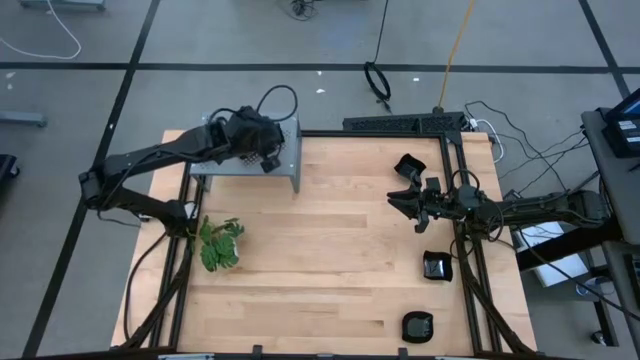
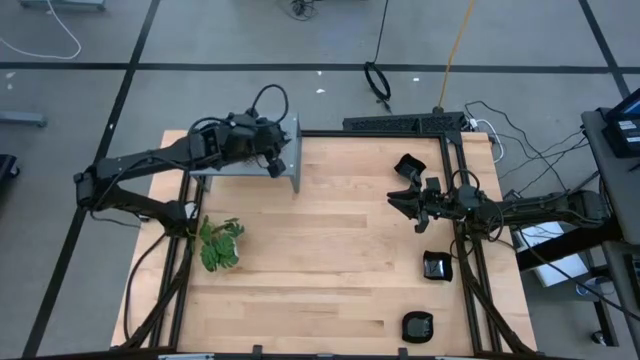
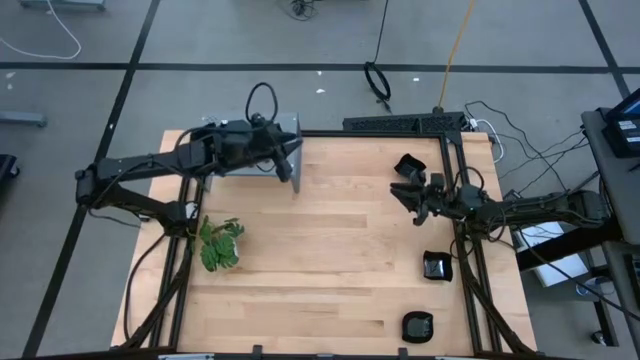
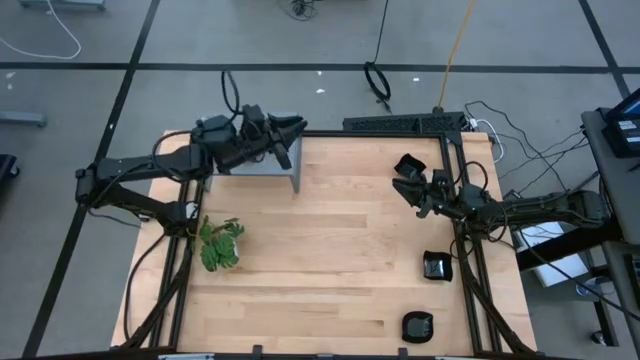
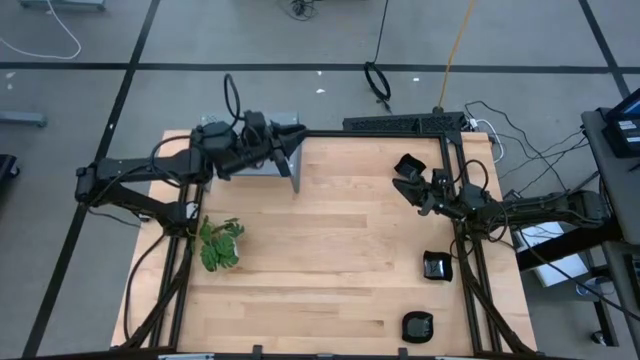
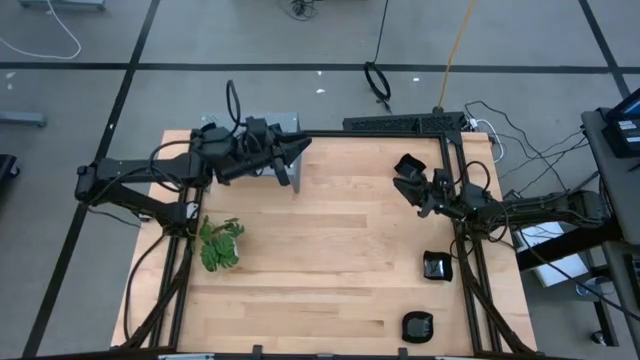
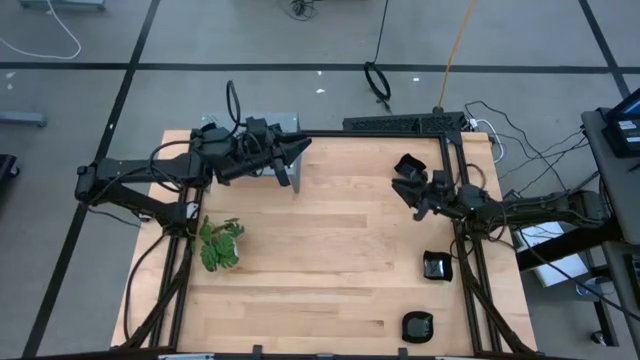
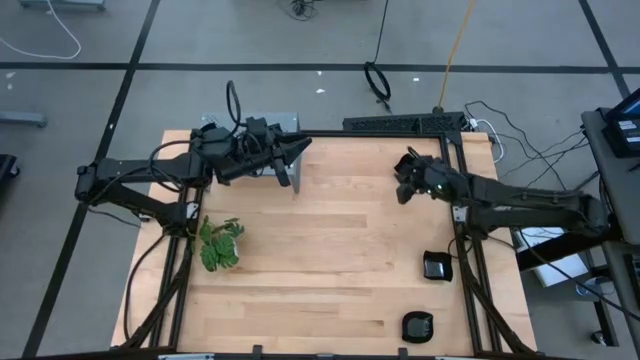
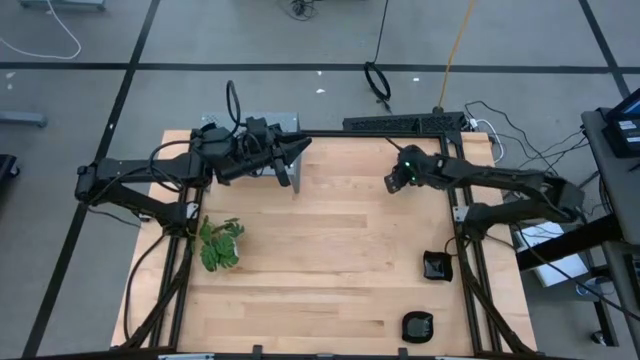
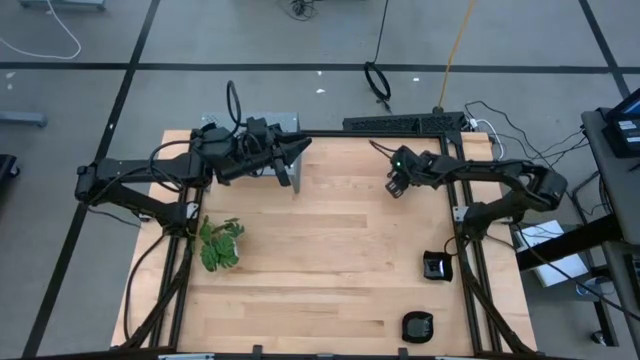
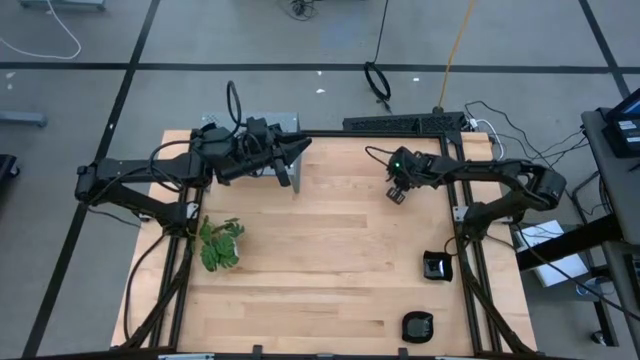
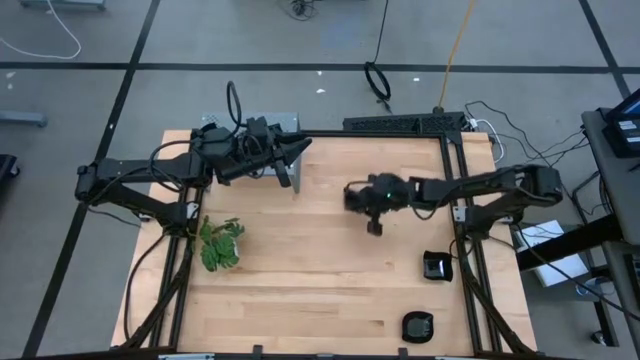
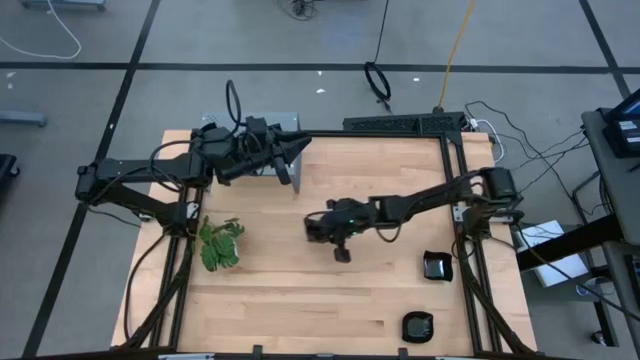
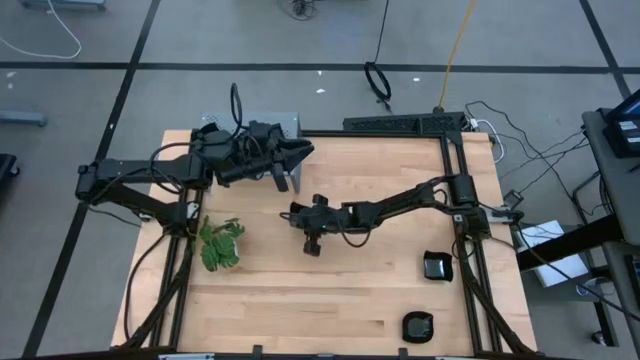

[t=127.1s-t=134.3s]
Task: Pick & Place Mini shaped plates
Move the distorted square plate to the center of the table

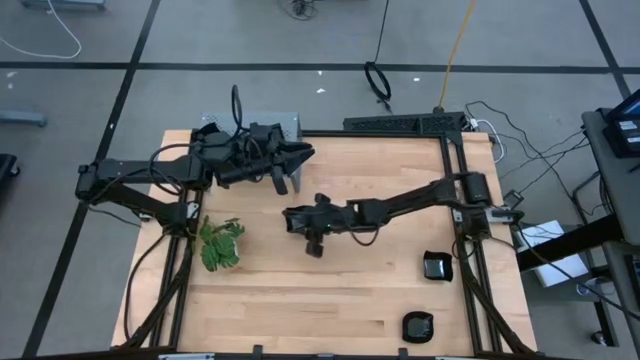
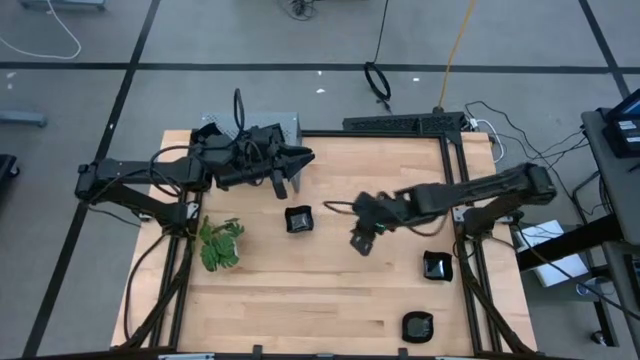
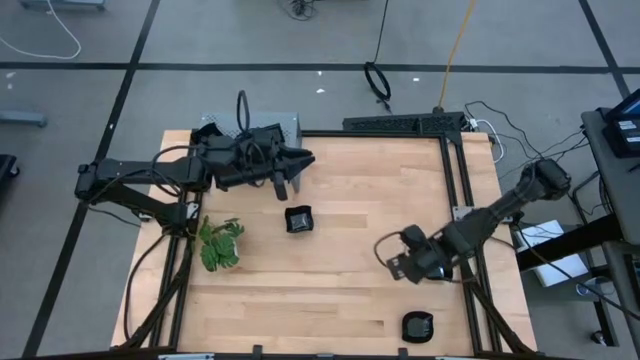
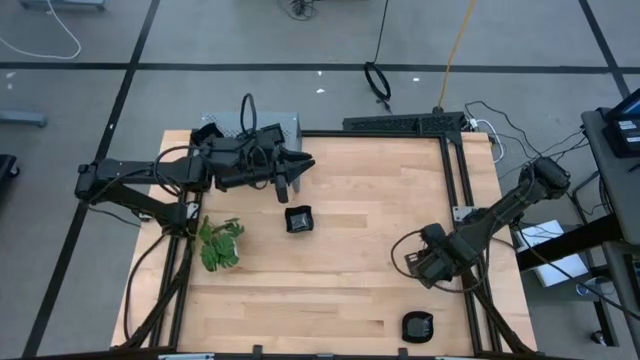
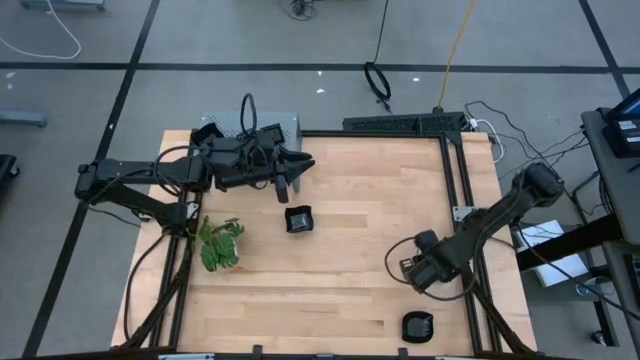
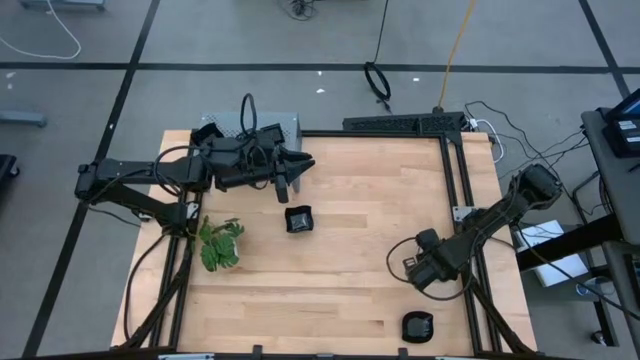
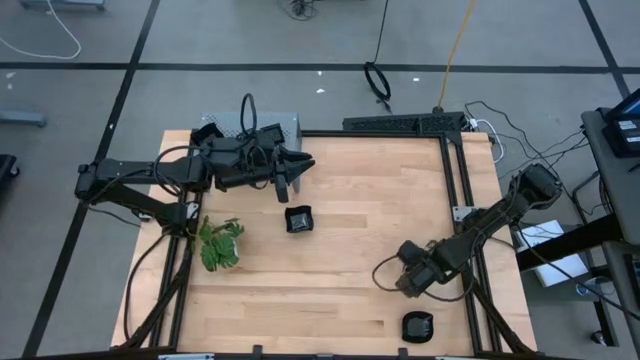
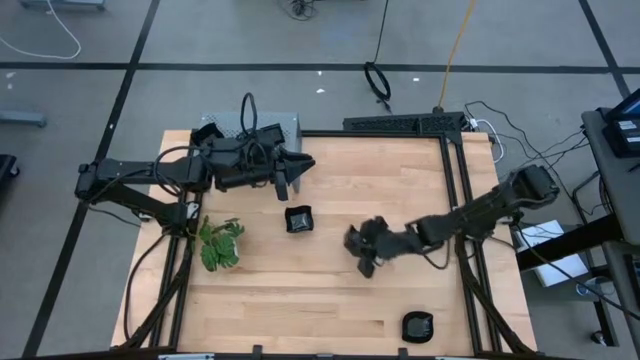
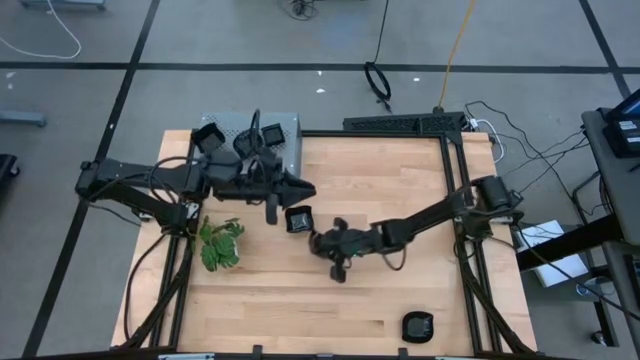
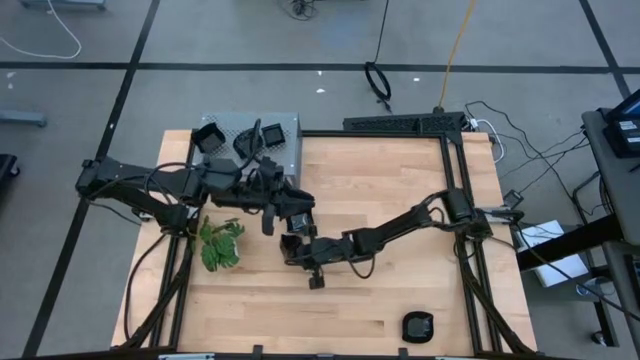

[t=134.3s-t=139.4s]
Move the distorted square plate to the center of the table

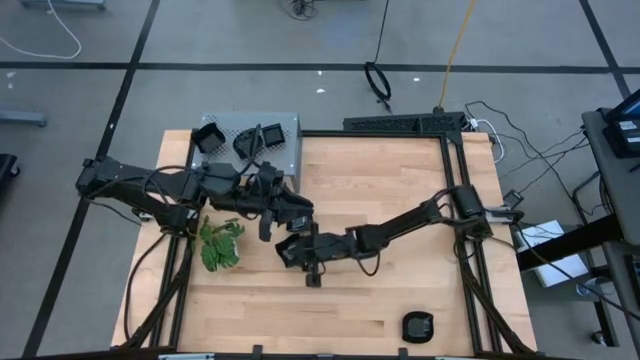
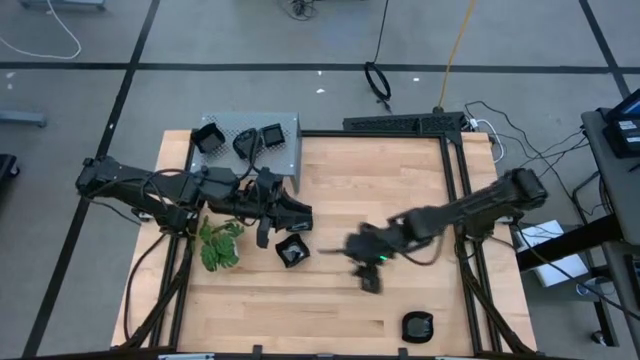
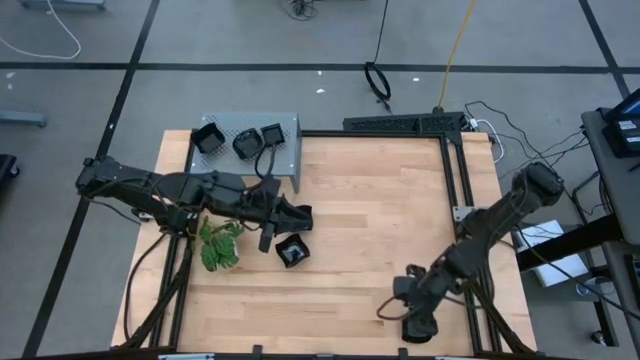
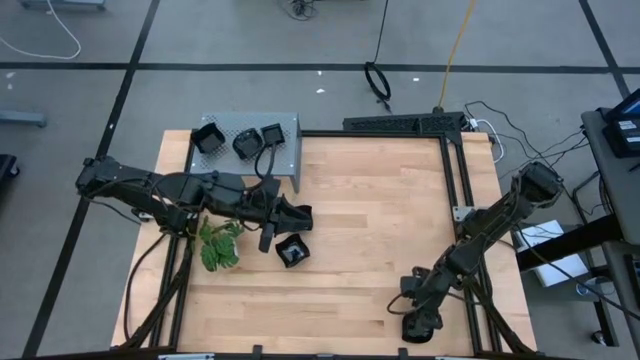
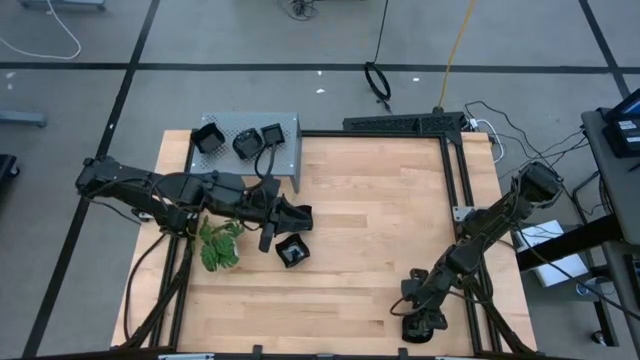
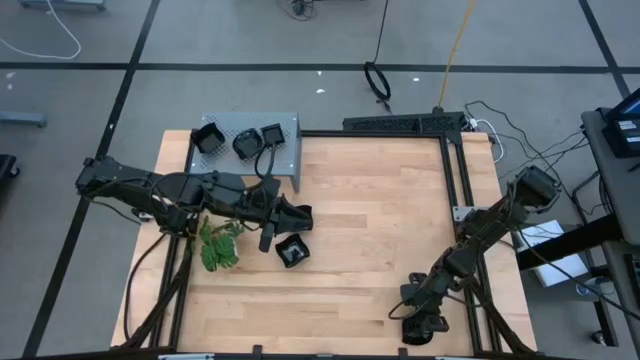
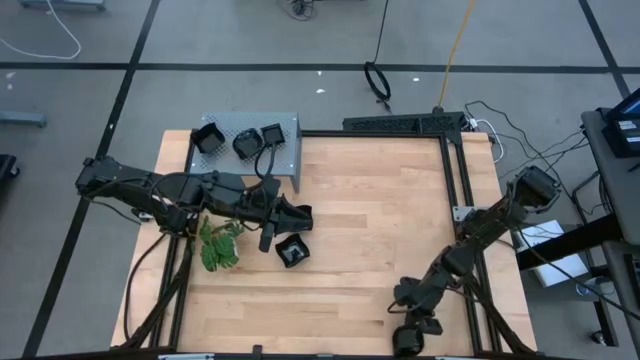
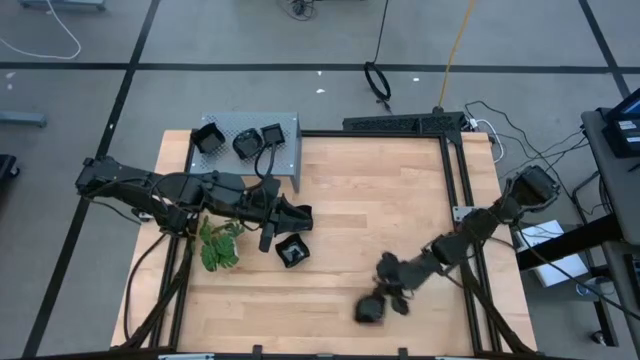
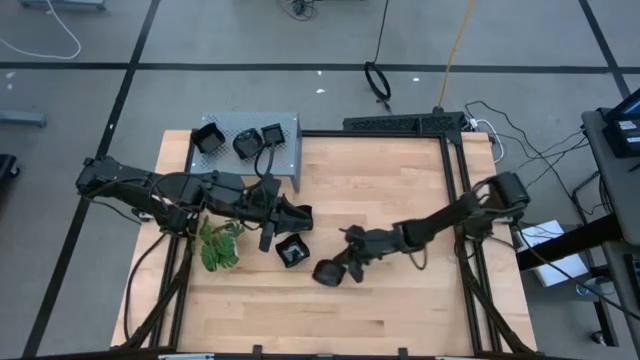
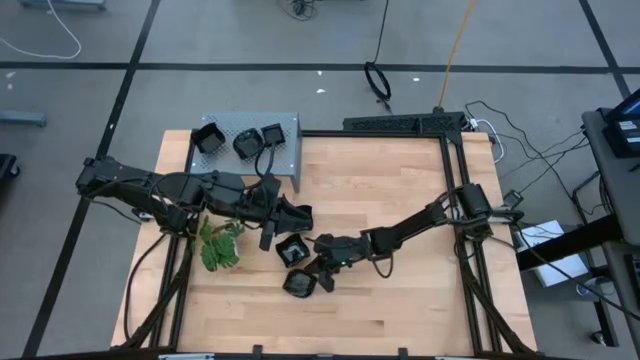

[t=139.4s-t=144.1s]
Move the leaf shaped plate to the center of the table

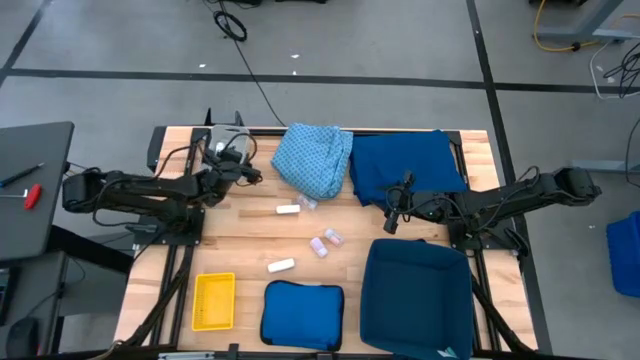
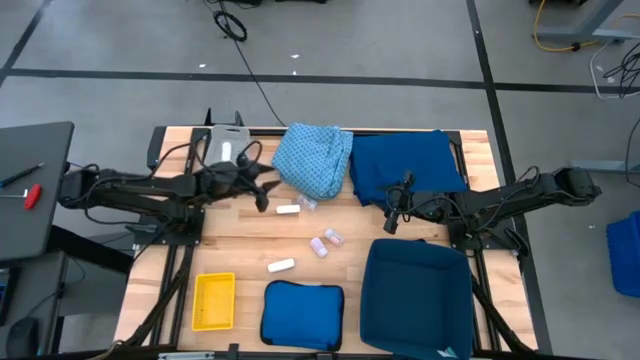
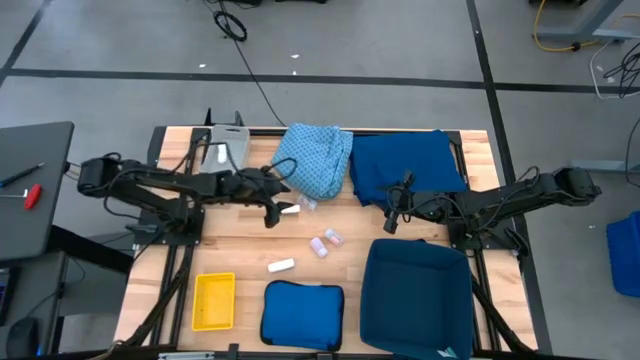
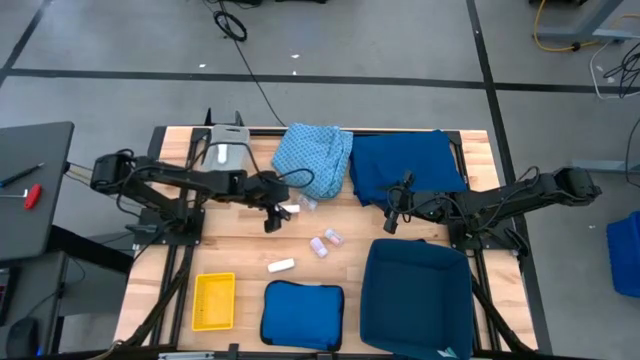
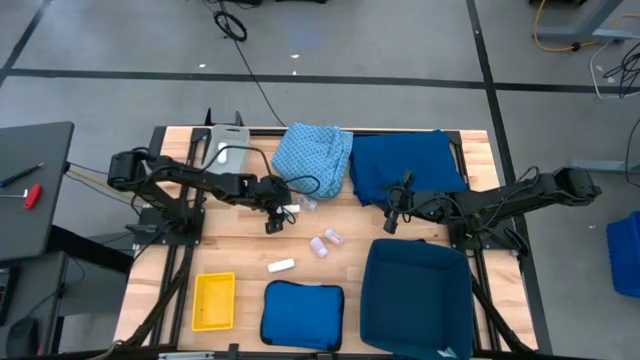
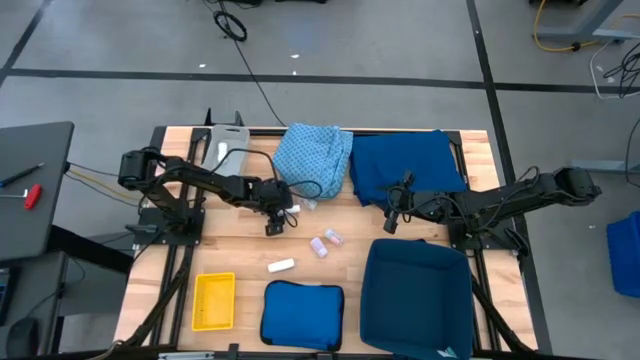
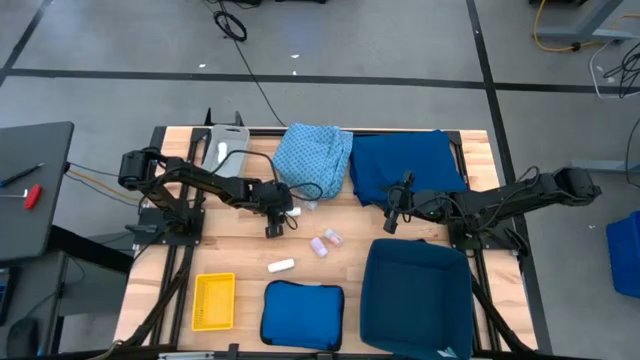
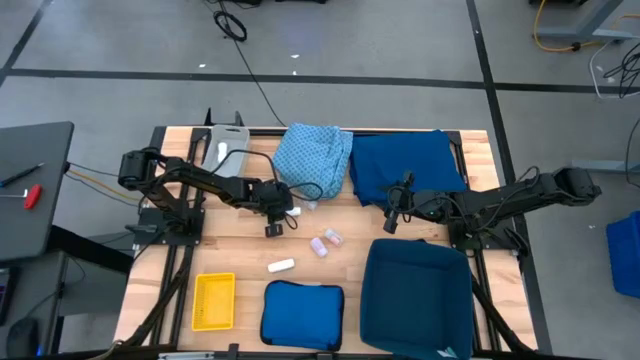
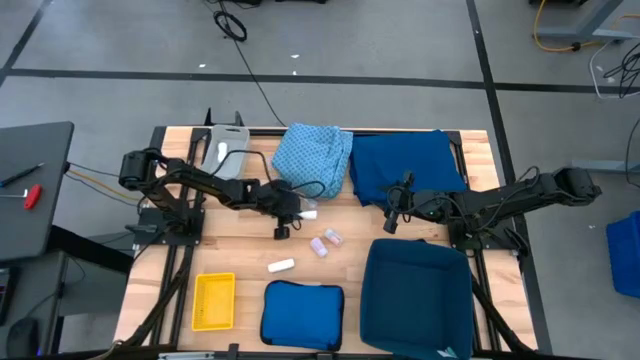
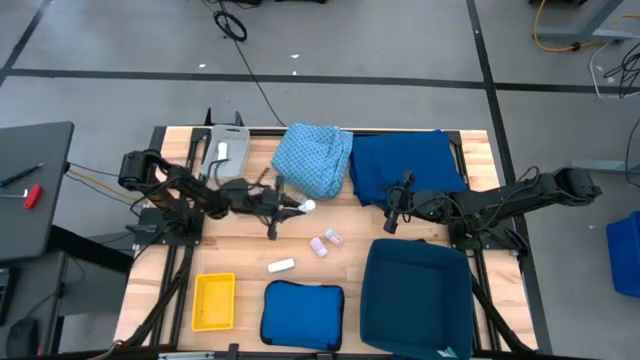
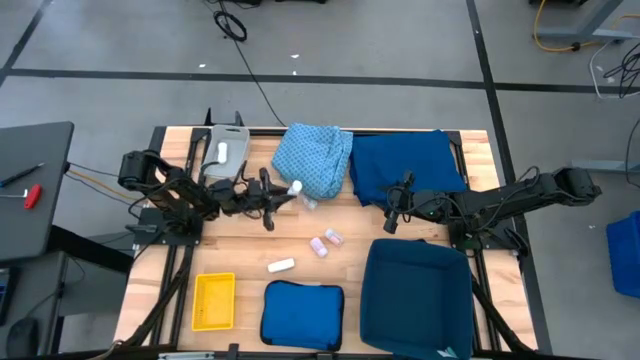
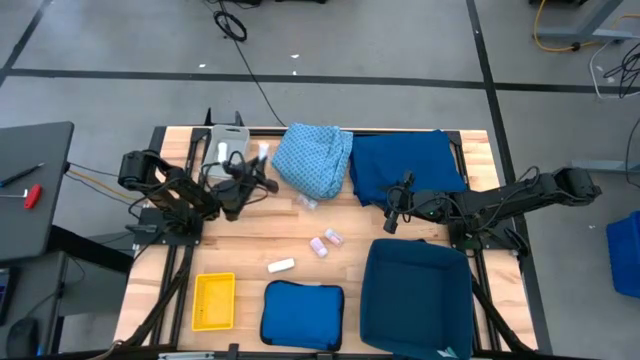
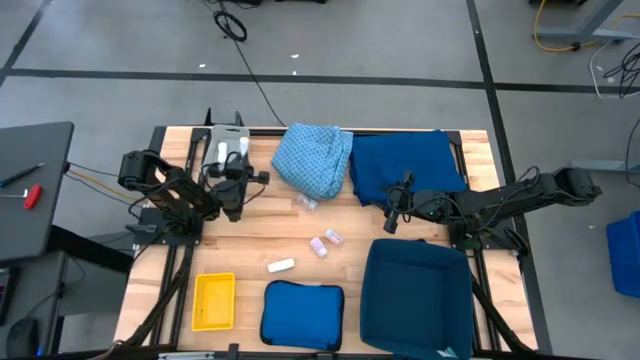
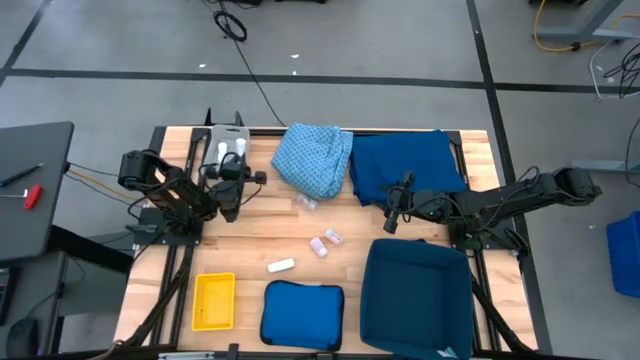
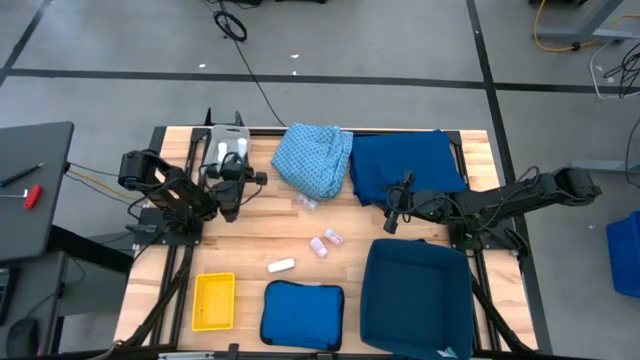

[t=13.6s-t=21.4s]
Task: Pick & place medical supplies in basket/bin
Put the top white rolled gauze into the gray bin
